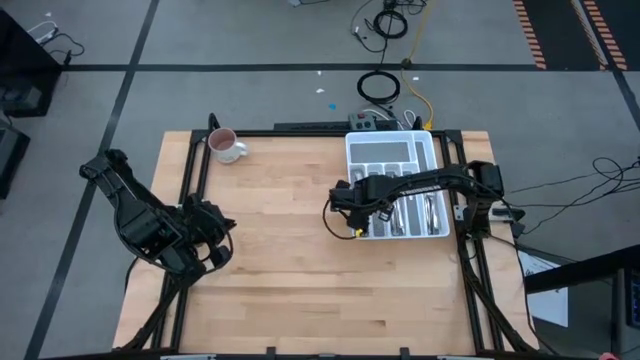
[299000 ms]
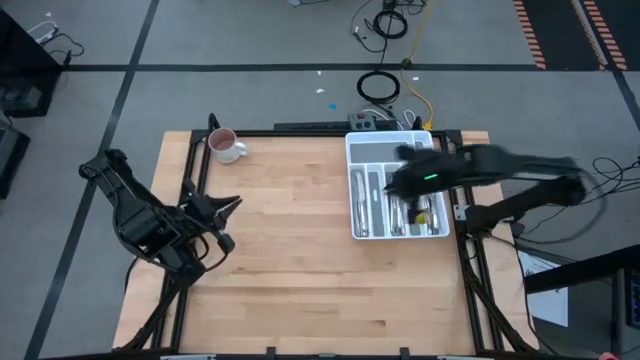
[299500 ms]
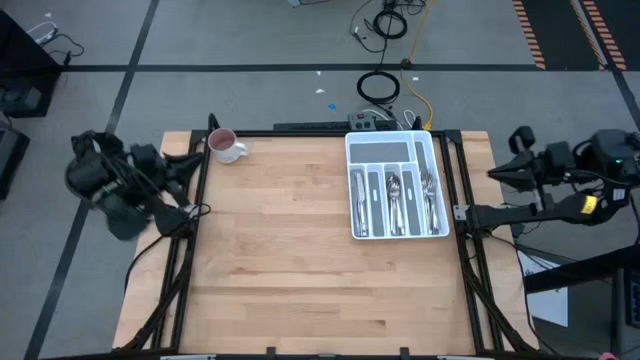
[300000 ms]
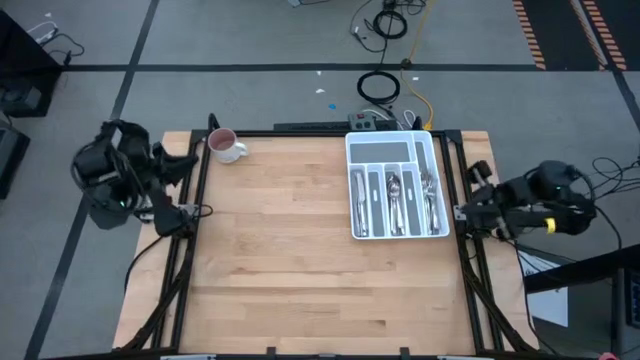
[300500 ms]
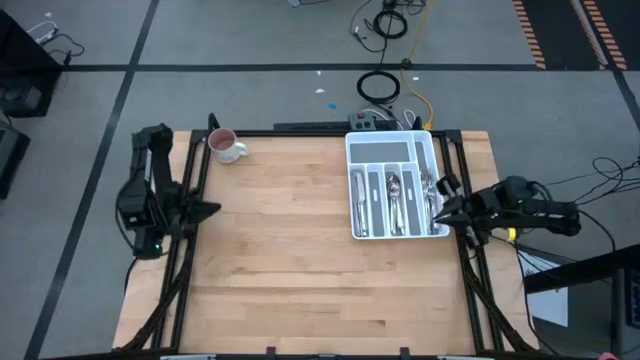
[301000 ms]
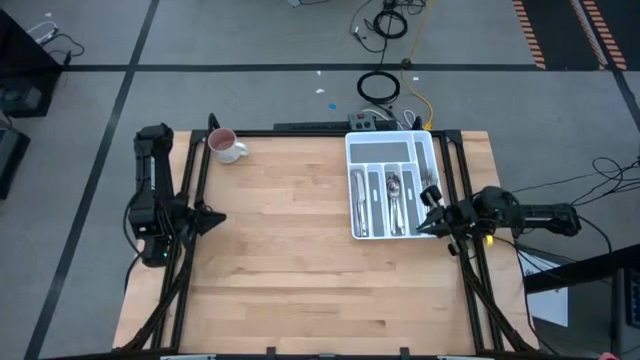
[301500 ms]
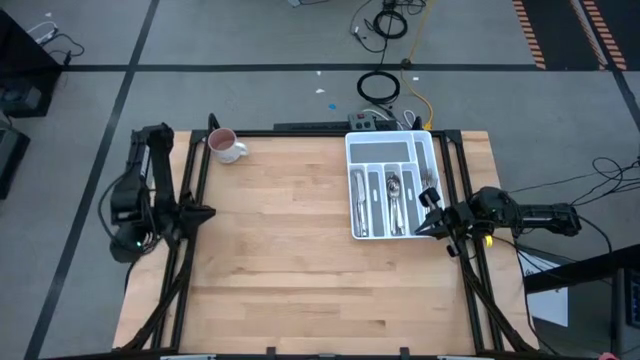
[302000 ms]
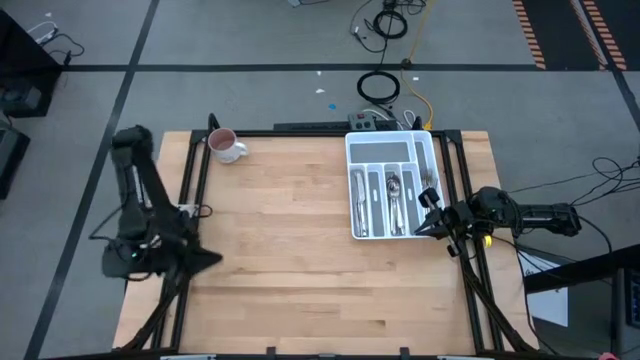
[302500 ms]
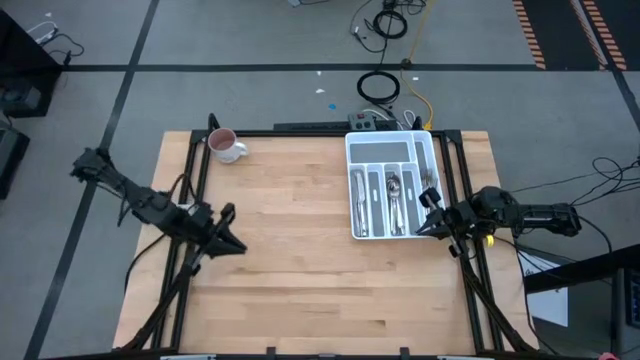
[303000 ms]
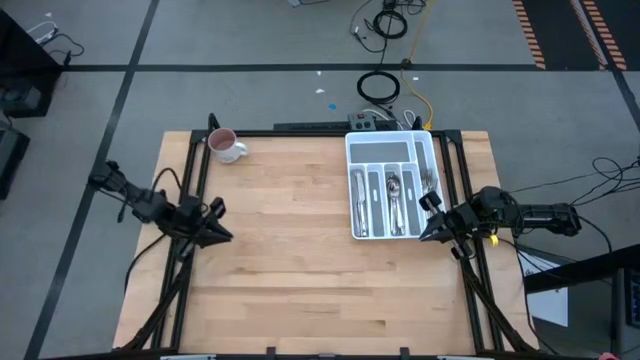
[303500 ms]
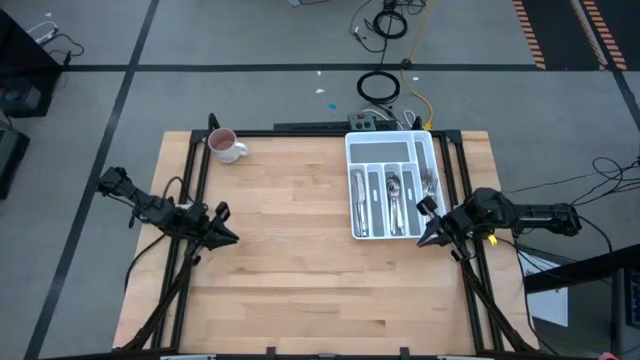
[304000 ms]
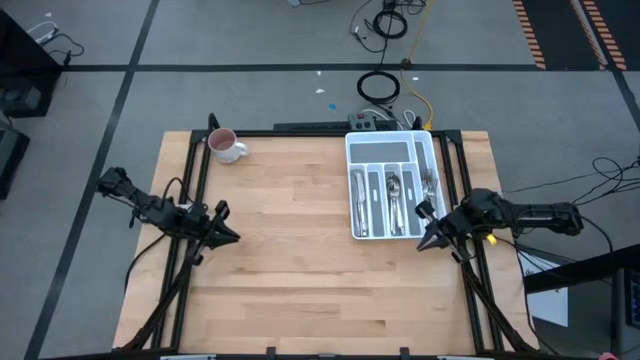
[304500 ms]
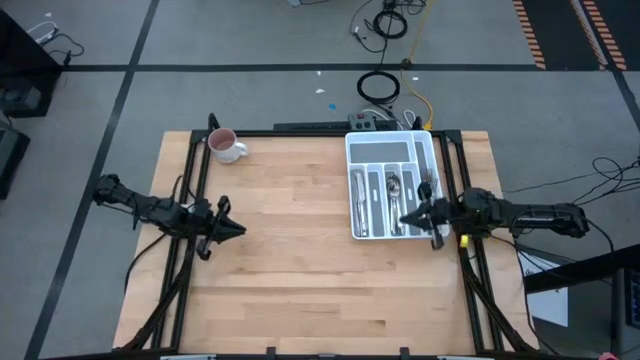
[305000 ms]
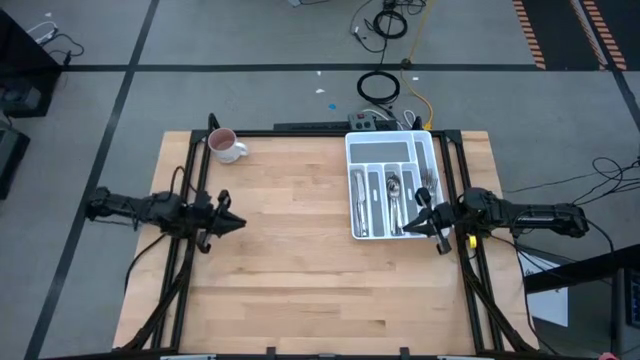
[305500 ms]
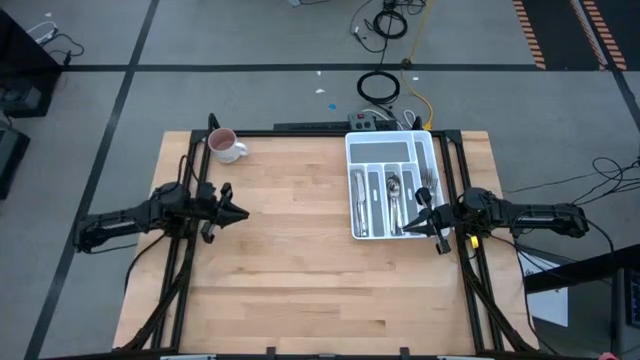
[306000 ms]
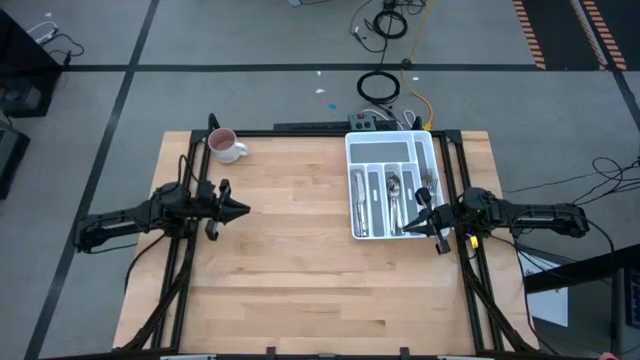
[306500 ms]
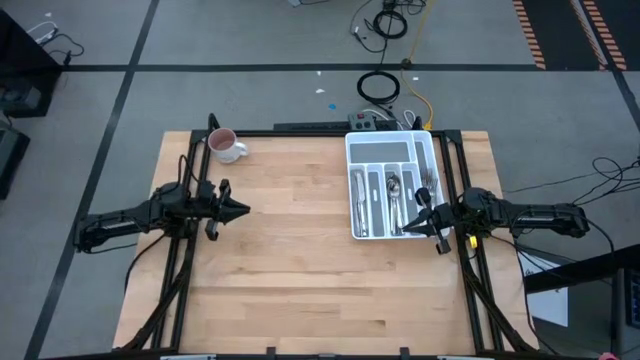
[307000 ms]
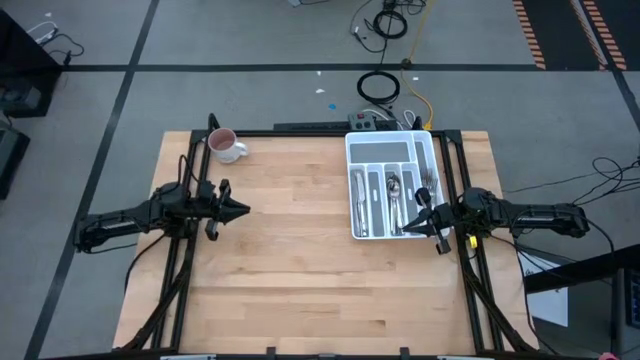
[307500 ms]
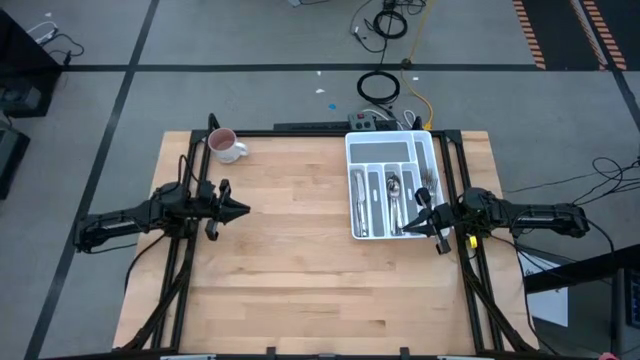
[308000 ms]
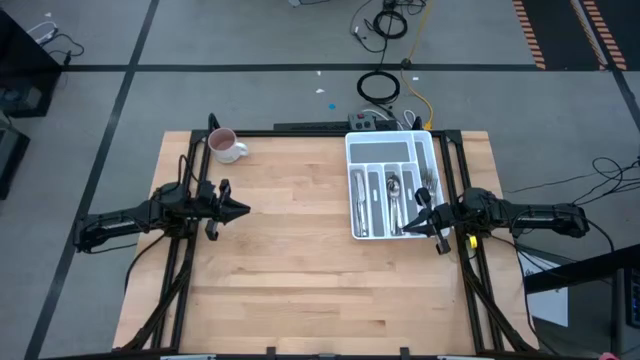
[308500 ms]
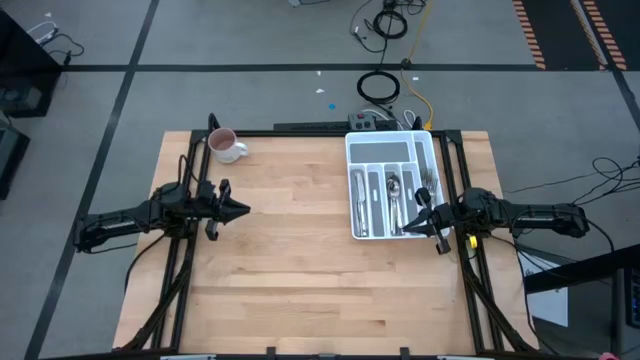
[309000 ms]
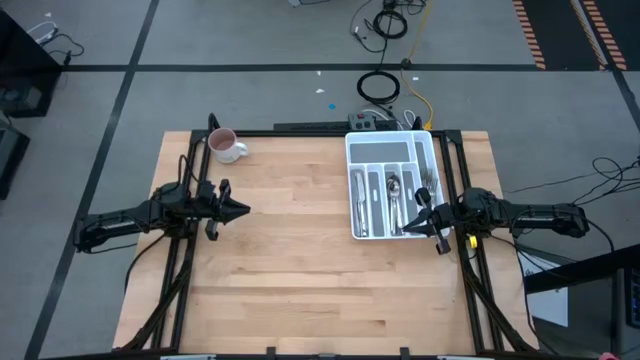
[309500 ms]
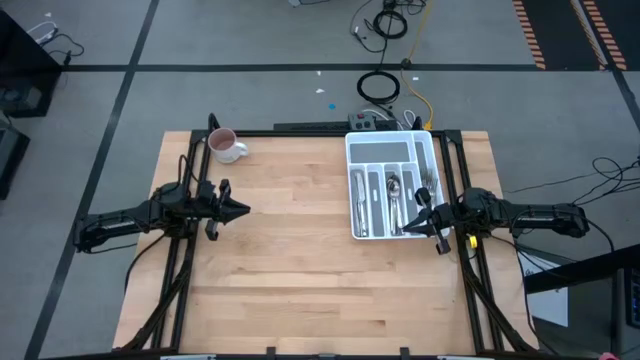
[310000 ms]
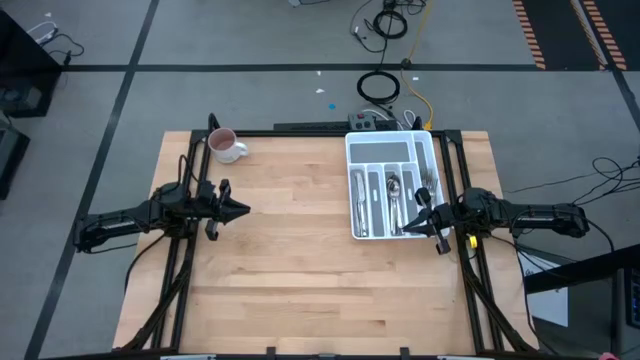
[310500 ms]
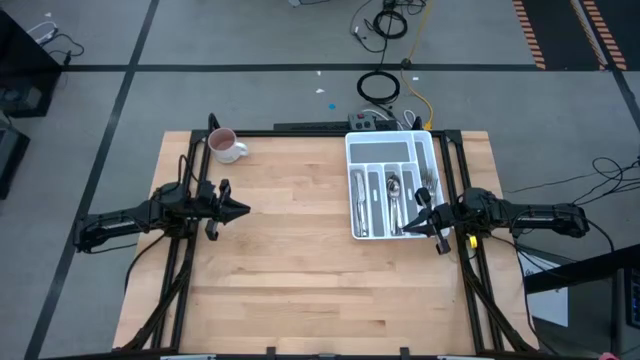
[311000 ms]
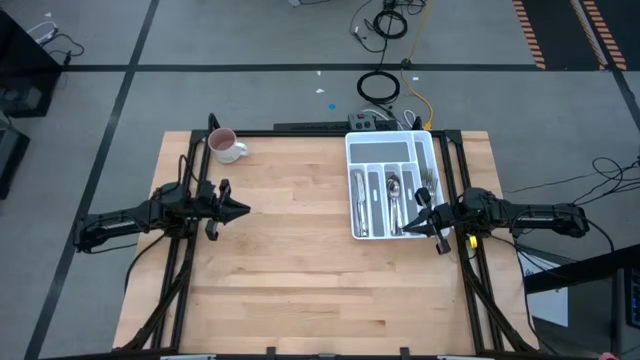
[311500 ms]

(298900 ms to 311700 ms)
Task: Sort silverware
Return to Home Position

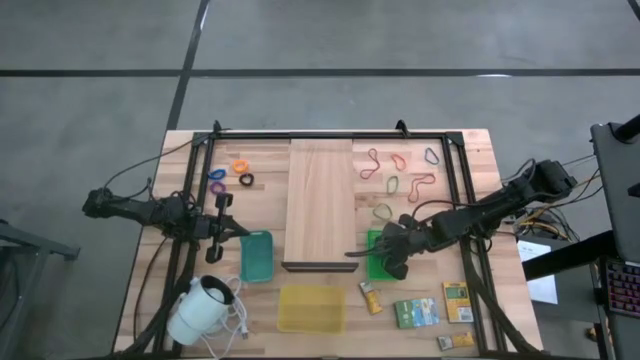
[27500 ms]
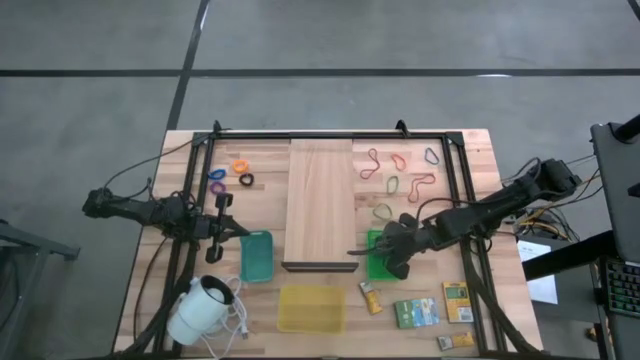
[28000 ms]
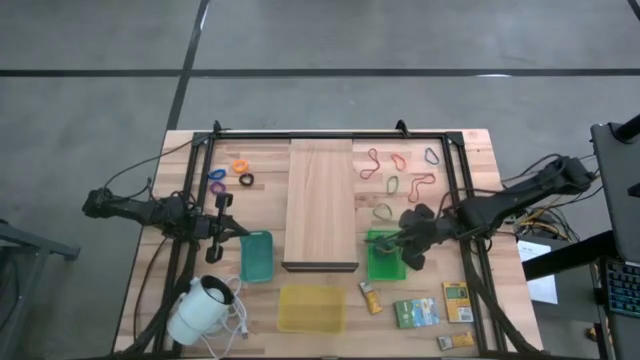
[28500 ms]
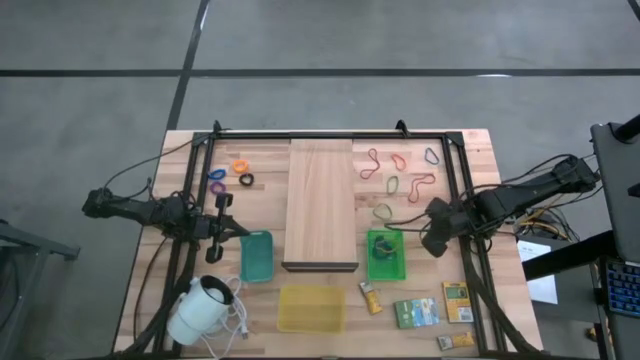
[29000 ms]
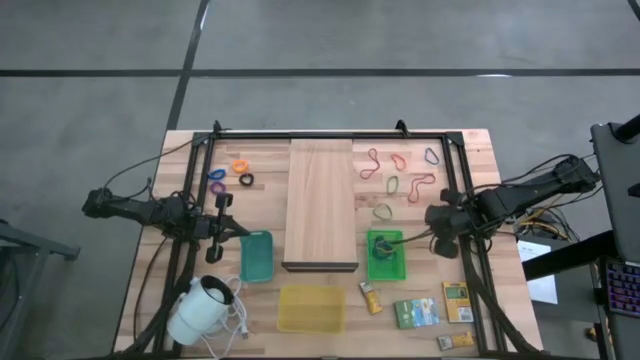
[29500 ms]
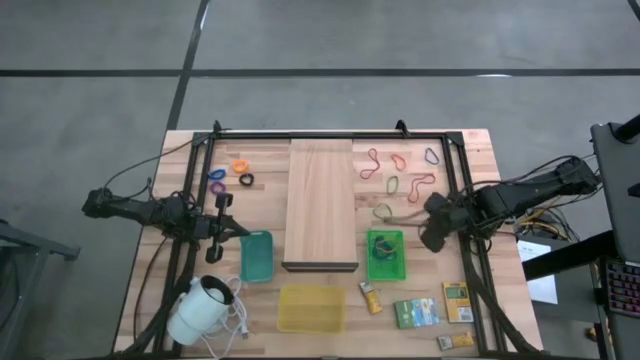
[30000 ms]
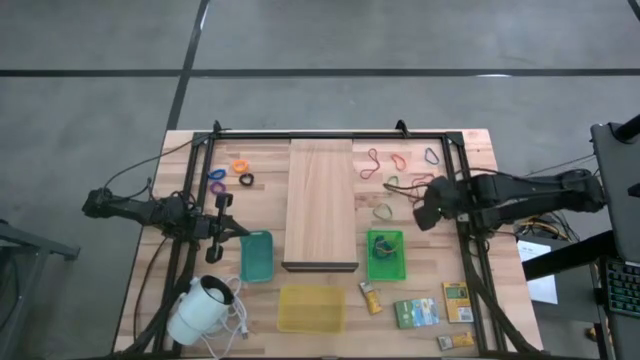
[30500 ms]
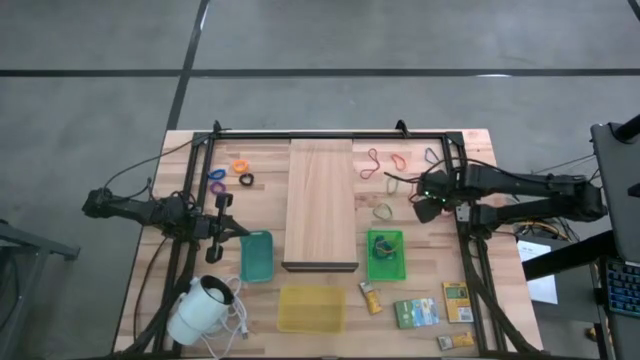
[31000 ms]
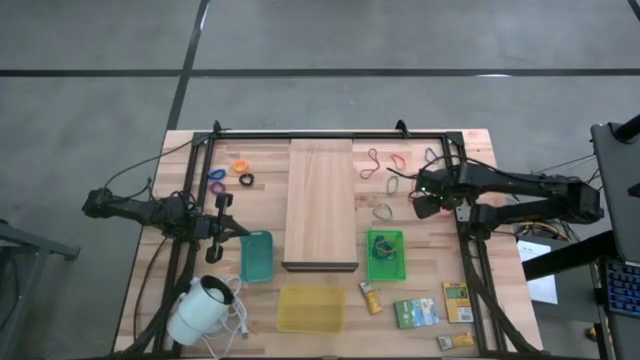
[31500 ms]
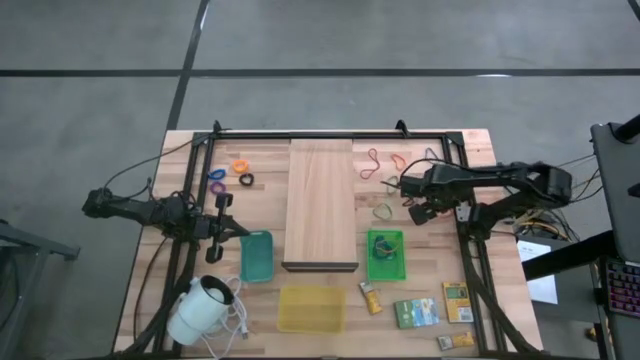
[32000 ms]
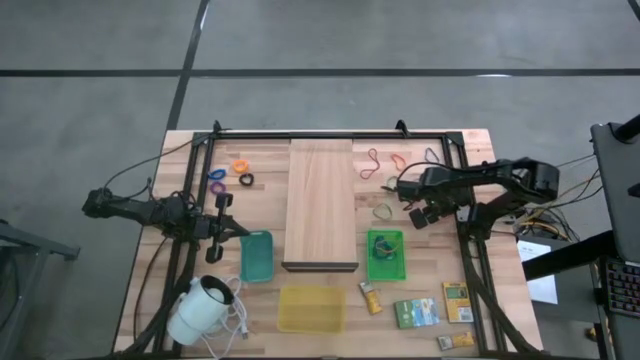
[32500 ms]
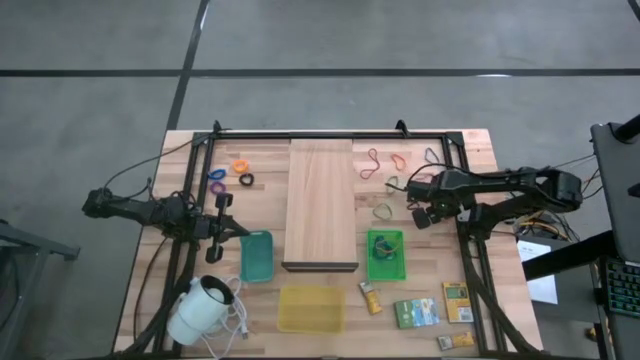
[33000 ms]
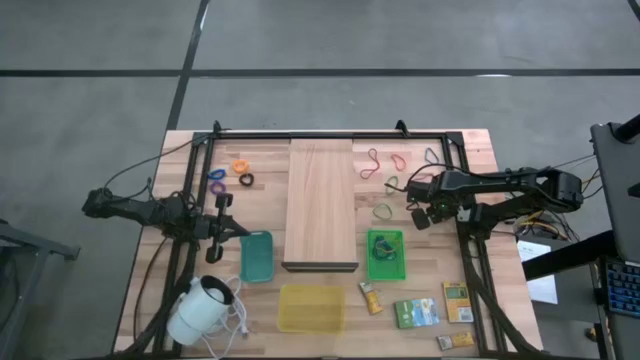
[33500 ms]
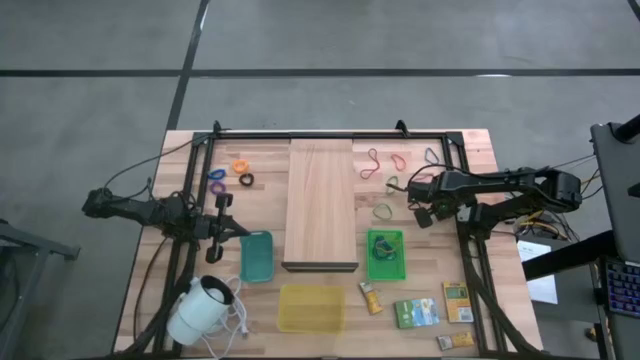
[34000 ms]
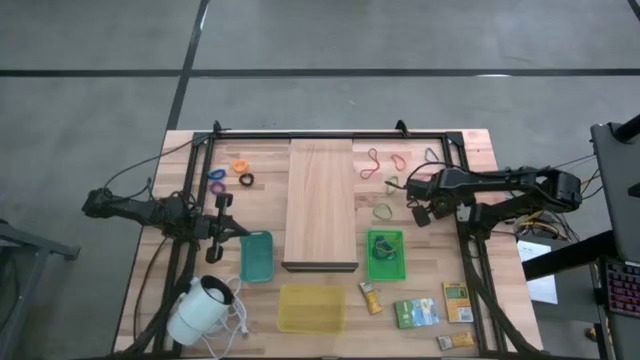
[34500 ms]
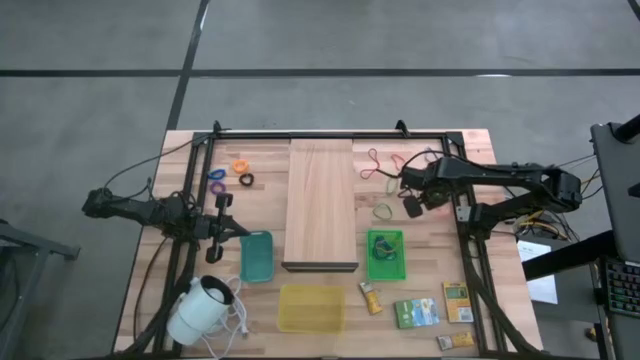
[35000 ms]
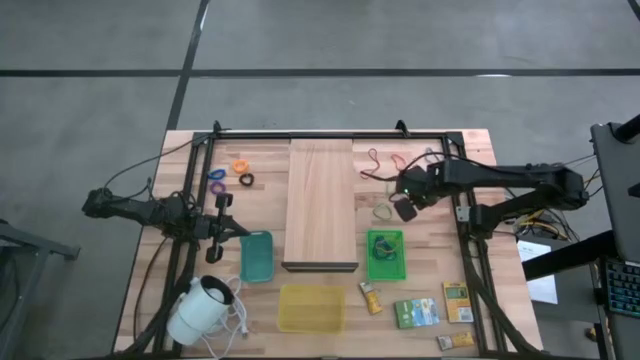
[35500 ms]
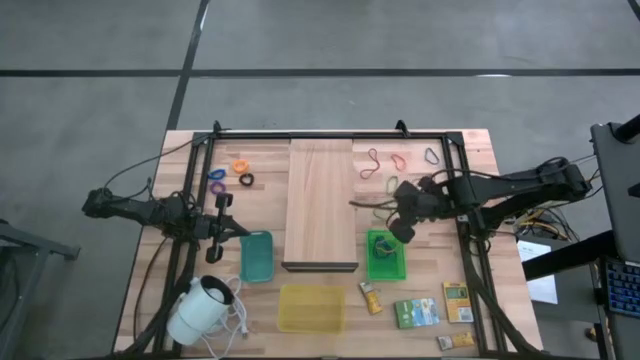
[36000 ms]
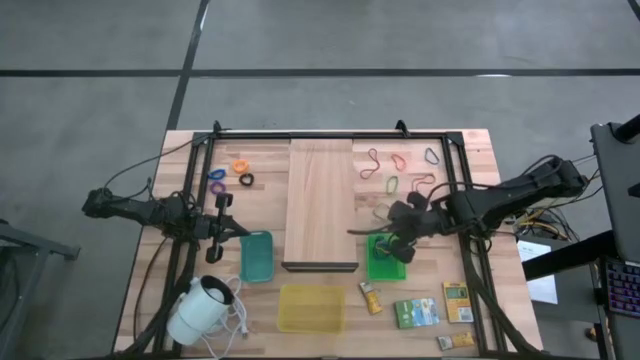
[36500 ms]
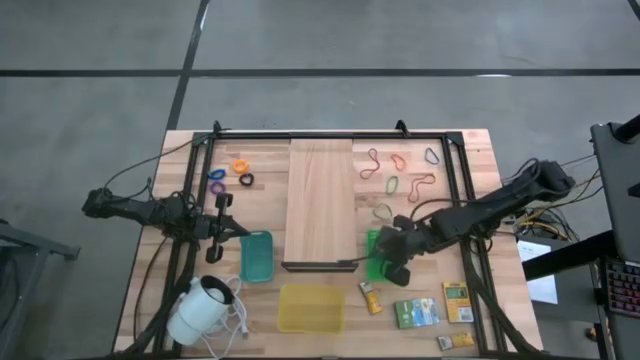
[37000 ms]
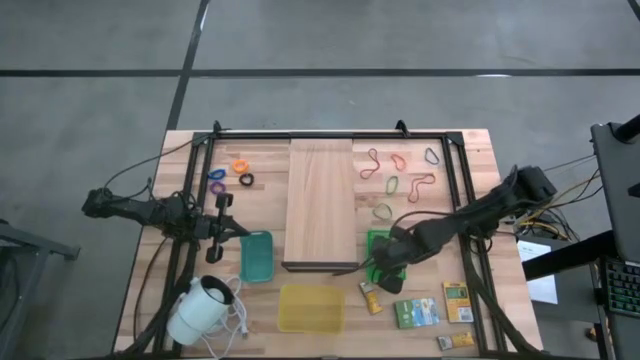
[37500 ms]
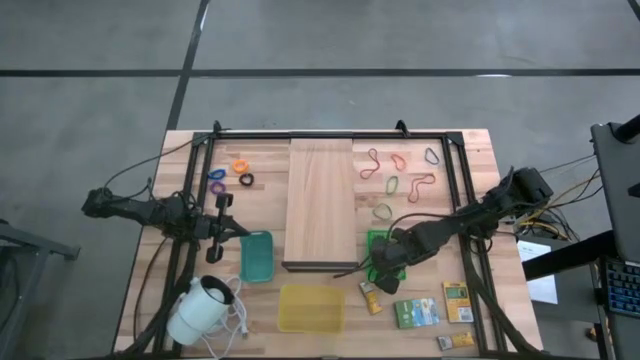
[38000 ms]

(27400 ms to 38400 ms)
Task: Pick & Place Office Desk Supplies
Put the bottom orange rubber band into the green bin
